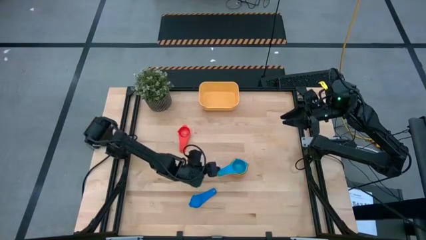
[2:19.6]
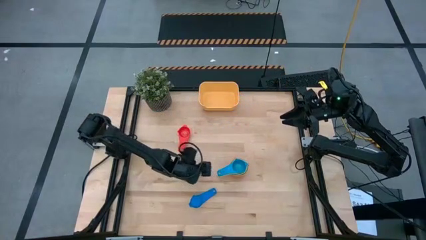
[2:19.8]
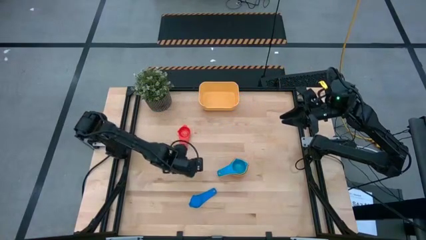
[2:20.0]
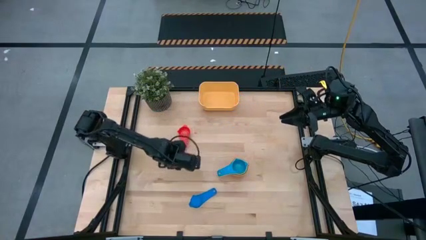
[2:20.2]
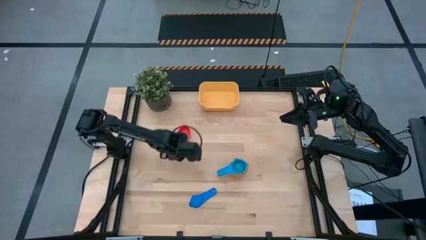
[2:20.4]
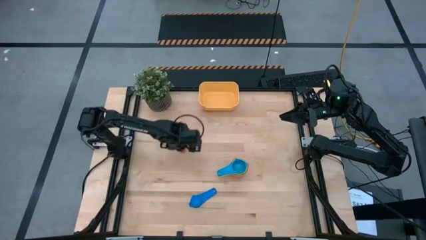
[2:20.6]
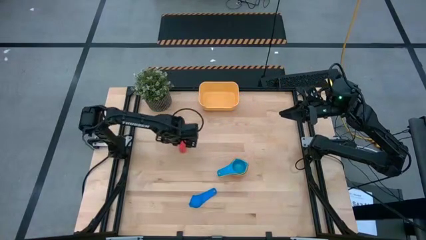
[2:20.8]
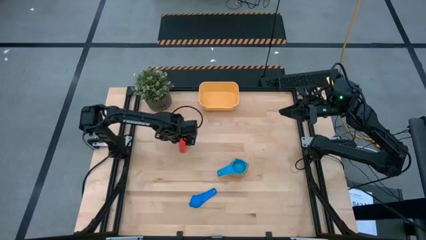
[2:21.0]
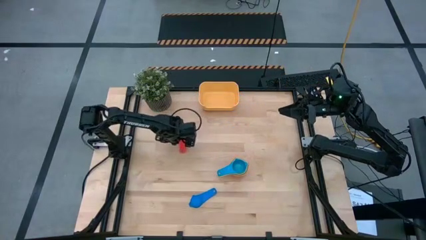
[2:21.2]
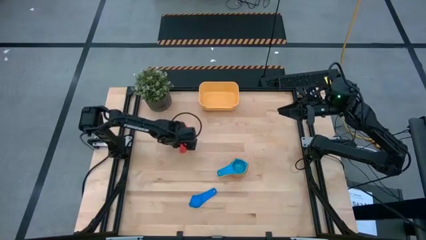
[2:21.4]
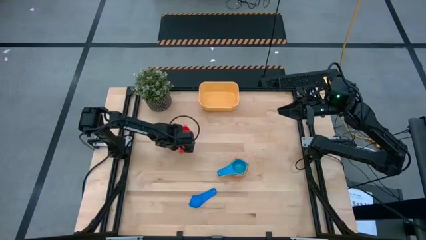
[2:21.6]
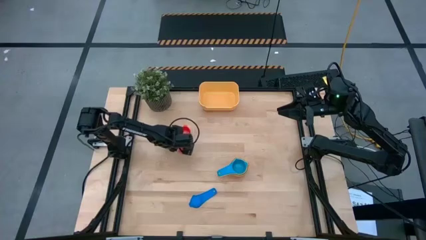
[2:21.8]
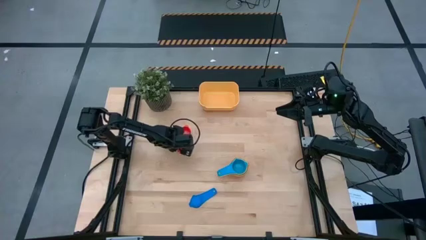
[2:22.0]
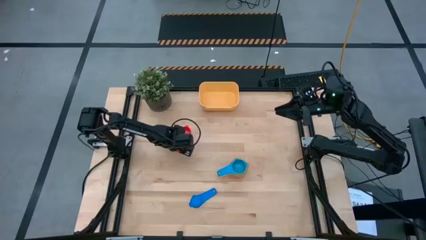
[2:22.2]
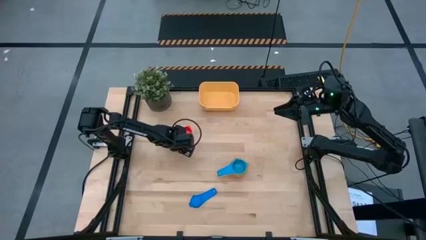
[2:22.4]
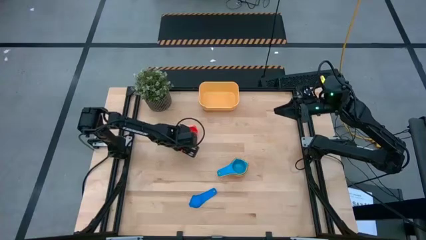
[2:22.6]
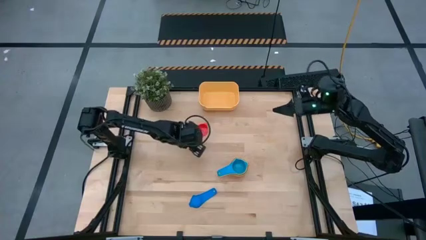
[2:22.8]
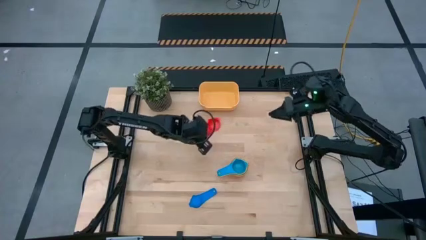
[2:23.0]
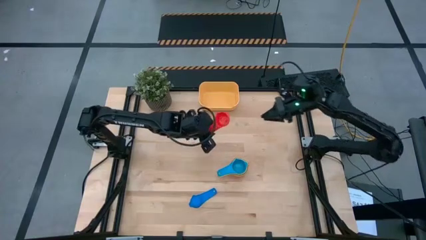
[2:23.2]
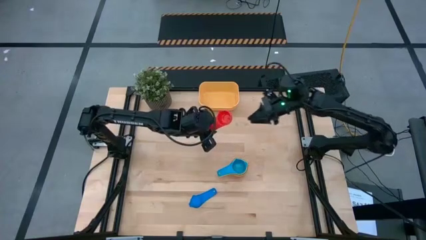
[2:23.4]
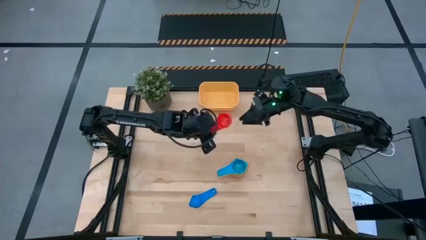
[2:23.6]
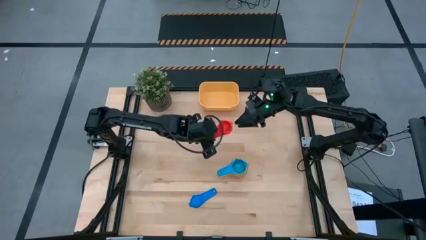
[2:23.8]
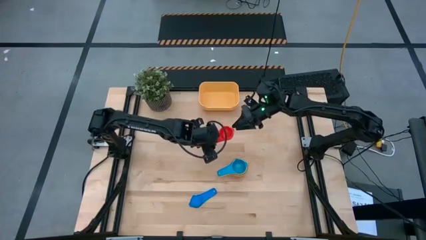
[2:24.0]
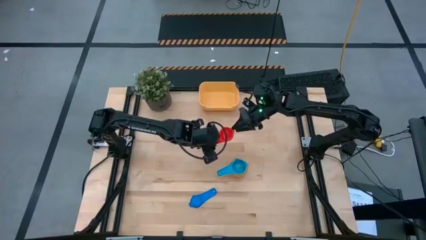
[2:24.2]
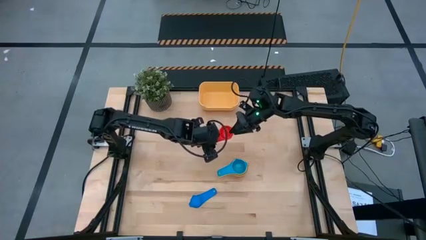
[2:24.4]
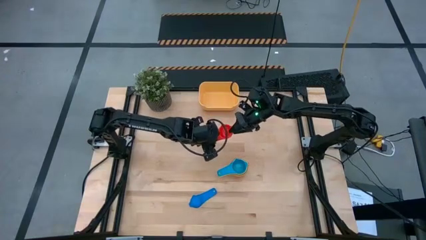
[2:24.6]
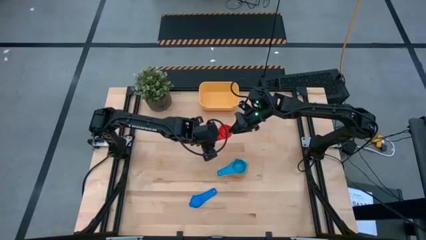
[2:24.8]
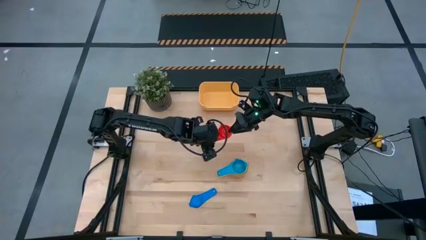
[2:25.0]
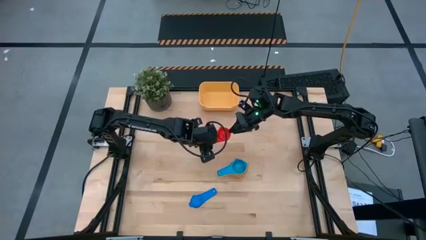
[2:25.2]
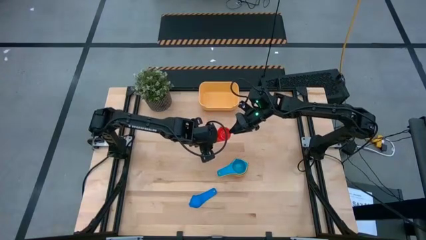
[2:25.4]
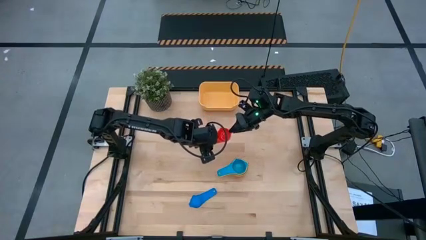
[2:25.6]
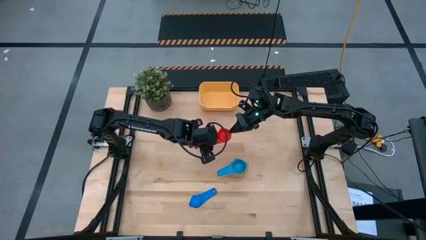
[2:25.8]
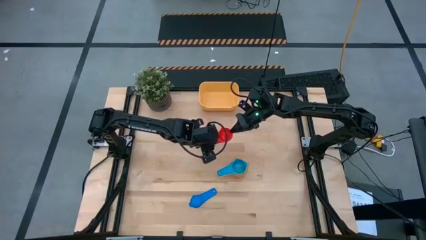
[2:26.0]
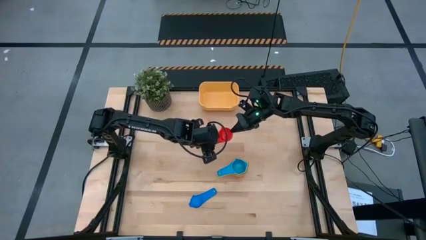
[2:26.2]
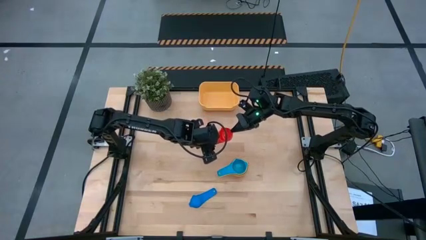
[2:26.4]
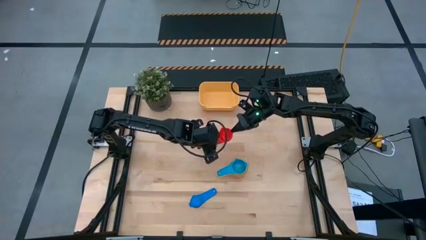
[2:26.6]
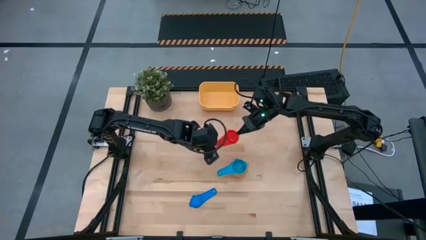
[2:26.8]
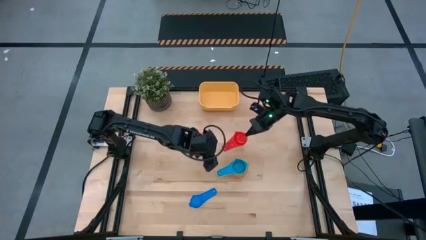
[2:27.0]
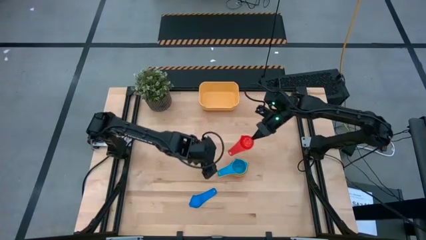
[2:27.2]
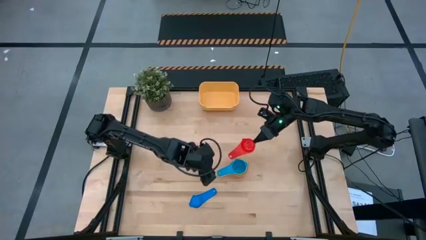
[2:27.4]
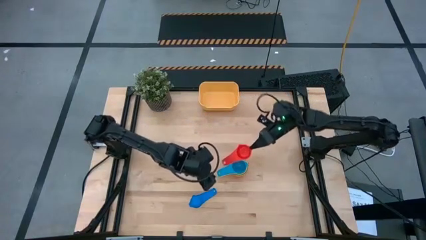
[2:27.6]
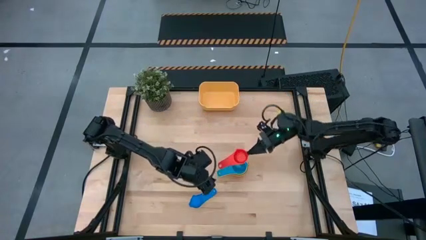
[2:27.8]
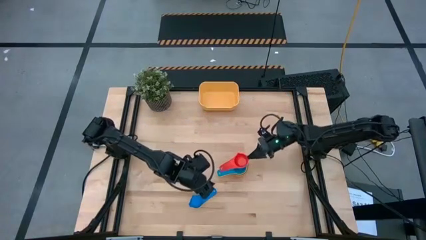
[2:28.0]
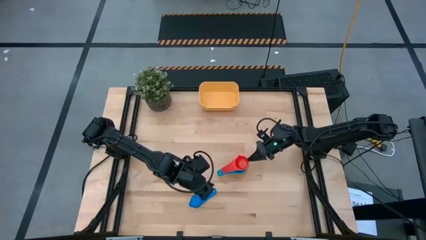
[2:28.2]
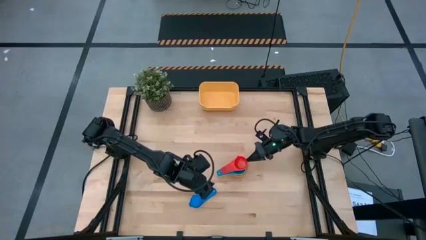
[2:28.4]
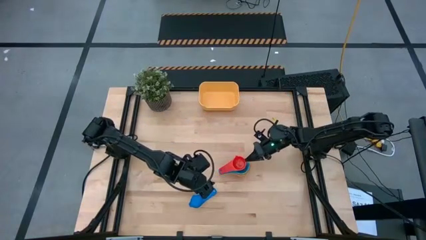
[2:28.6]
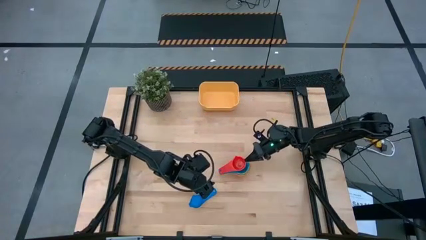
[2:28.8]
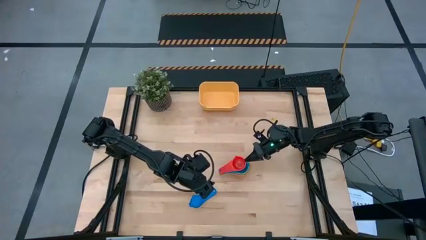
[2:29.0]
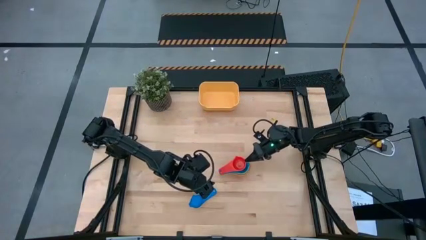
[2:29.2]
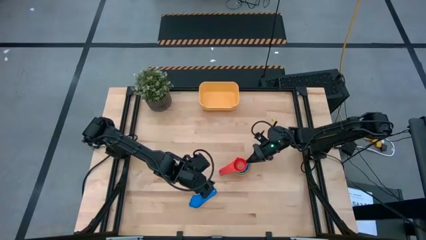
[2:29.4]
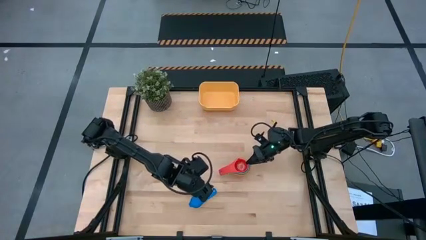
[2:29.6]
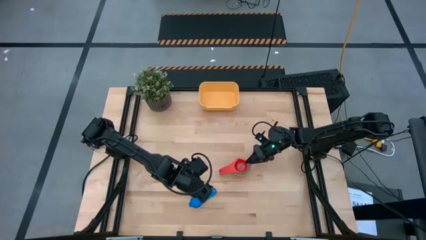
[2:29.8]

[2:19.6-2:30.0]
Task: Nest measuring cups in basket
Stack the red measuring cup on top of the light blue measuring cup

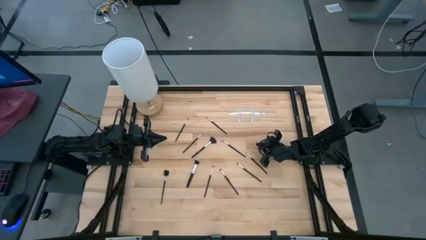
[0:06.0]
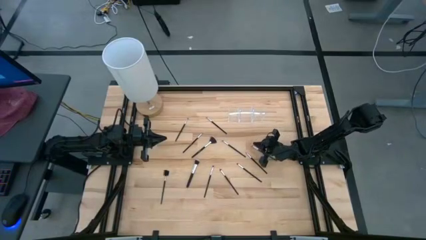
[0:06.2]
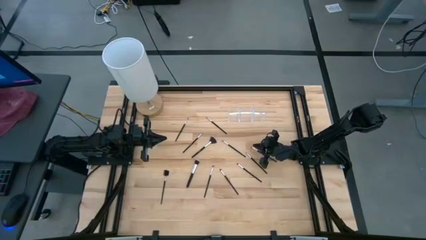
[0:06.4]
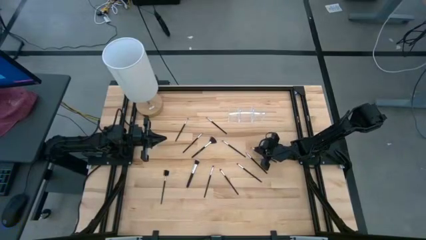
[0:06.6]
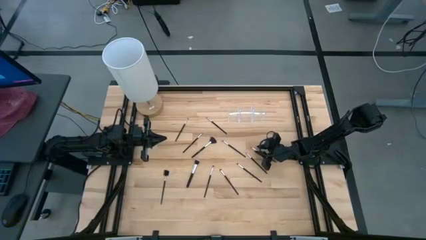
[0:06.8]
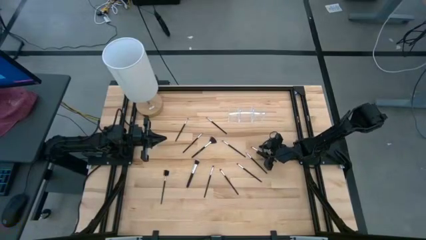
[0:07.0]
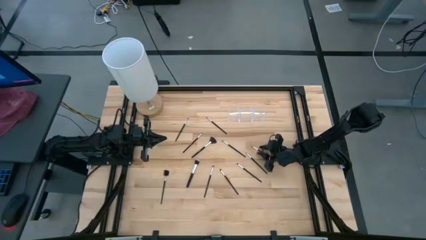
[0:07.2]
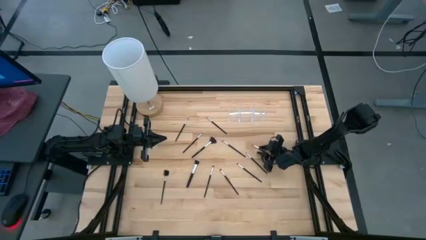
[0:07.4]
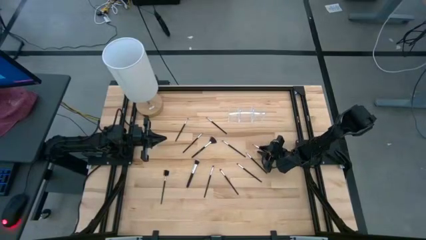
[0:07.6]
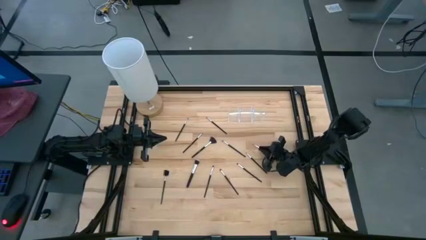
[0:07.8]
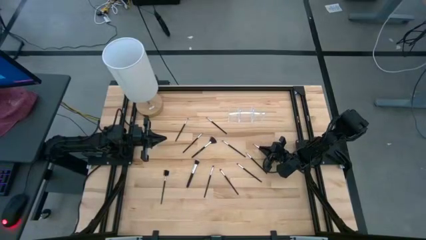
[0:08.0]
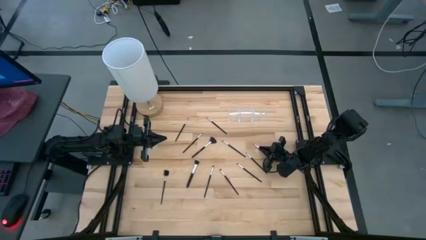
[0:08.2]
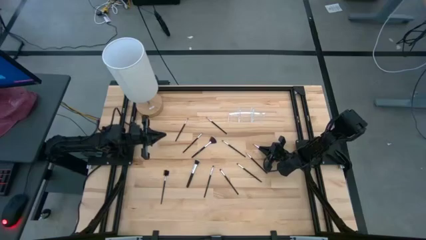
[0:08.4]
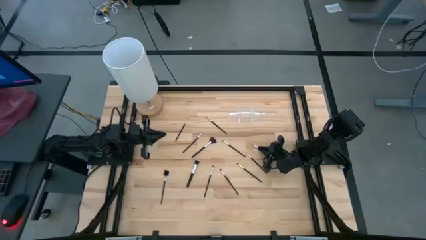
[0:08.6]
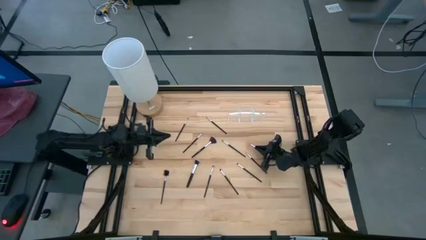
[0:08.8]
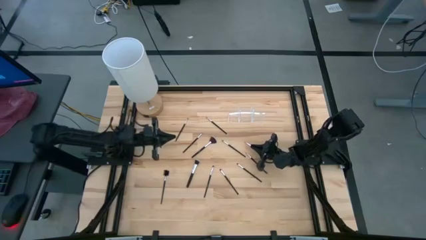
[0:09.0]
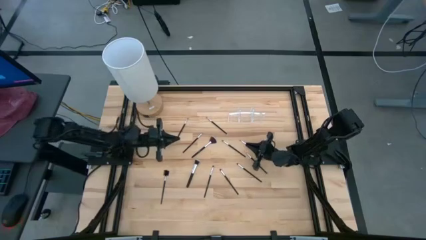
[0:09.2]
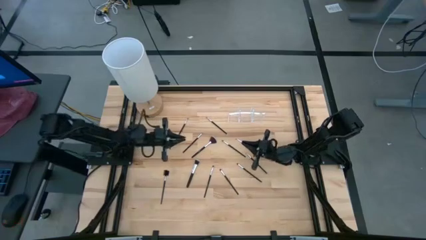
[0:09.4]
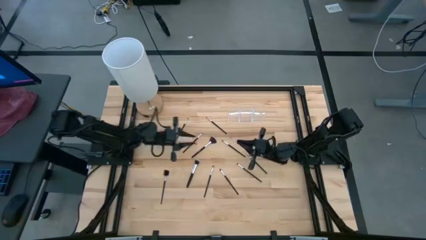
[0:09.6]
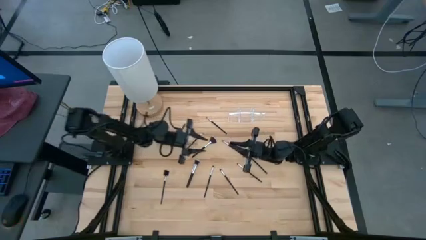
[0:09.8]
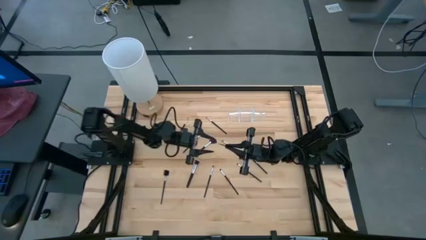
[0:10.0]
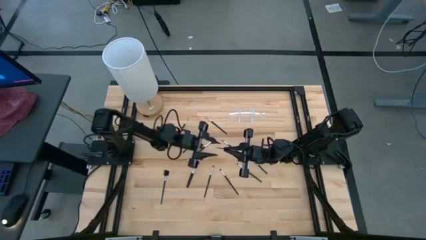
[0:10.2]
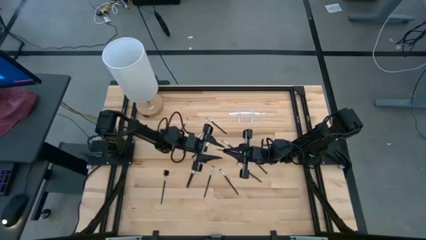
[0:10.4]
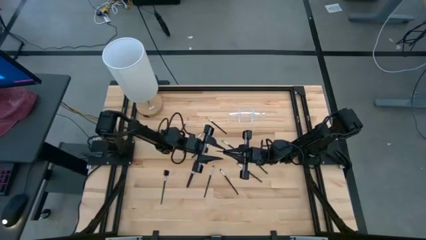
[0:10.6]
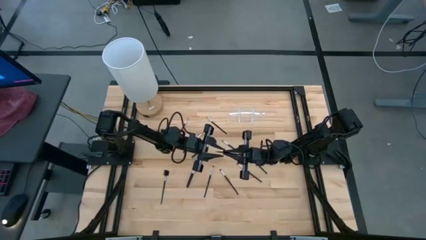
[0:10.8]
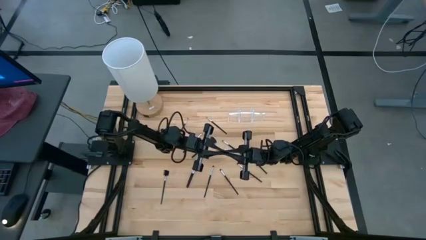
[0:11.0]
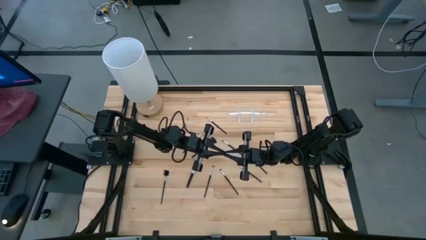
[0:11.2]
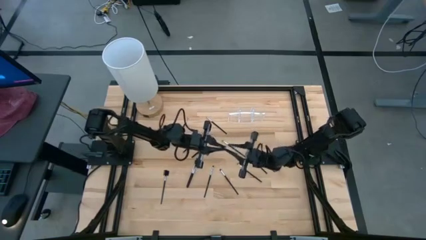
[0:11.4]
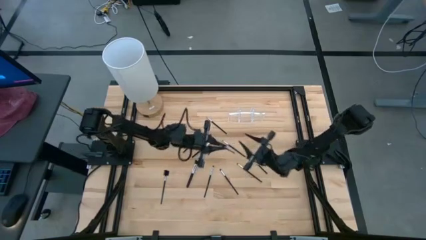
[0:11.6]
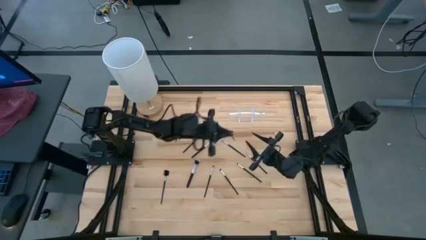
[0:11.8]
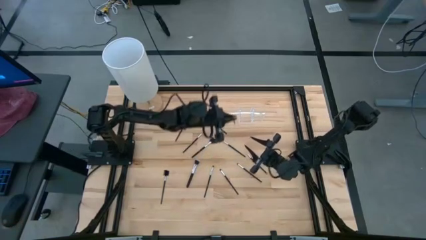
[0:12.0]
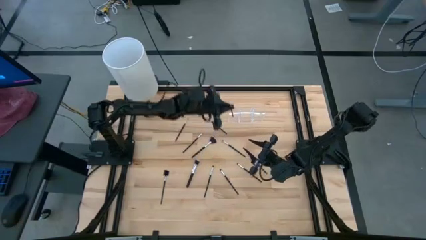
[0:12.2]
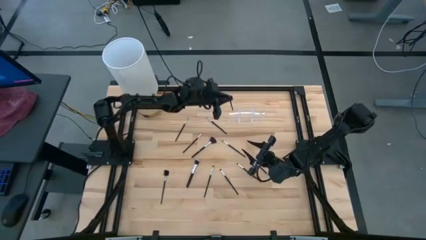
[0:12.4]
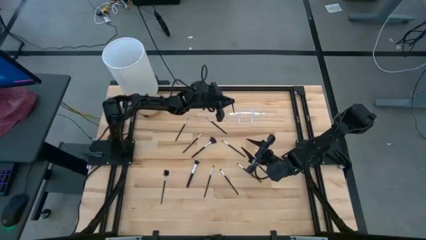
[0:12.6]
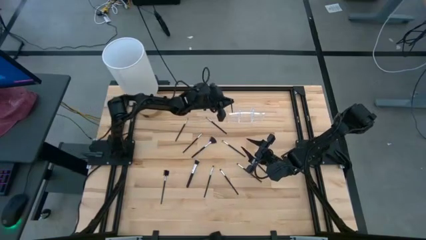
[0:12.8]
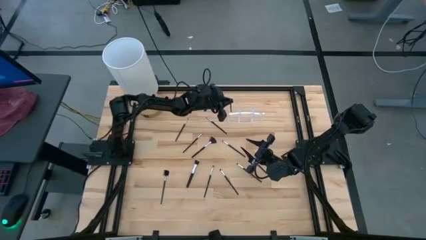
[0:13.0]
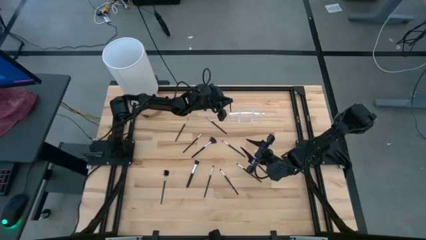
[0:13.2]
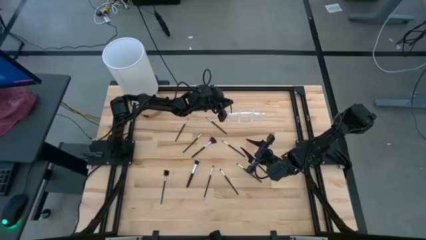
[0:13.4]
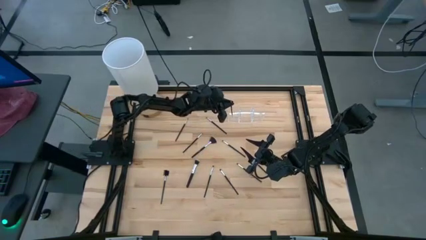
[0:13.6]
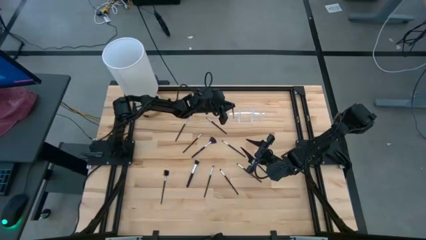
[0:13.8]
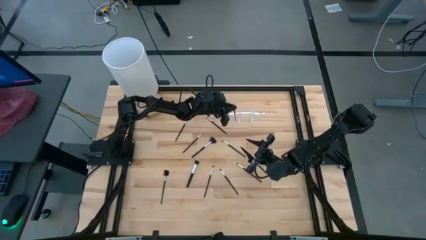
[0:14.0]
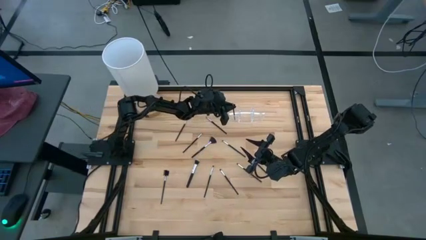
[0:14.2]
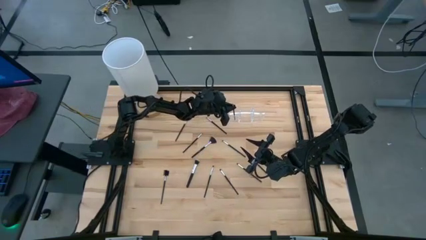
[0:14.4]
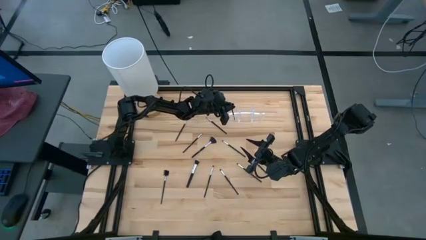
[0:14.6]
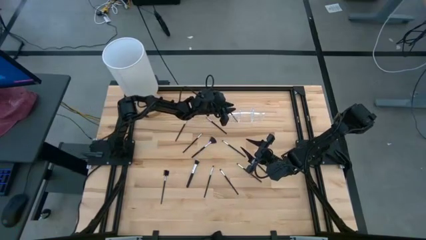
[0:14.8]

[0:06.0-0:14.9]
Task: Put items in baskets/containers
Put the black eyeshadow brush into the transparent organizer
